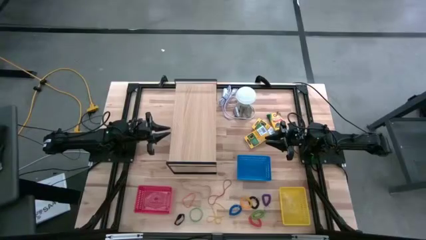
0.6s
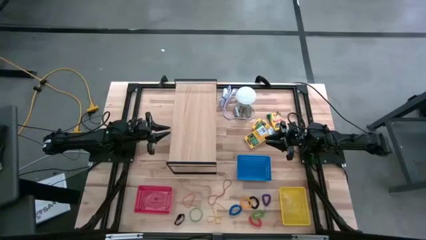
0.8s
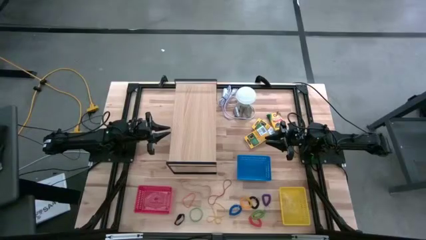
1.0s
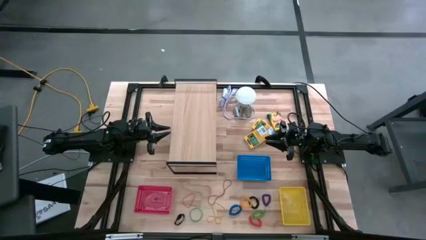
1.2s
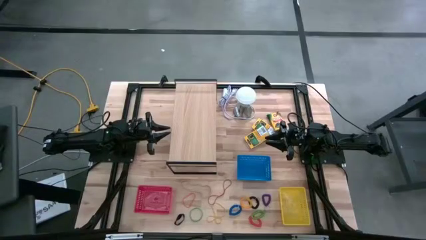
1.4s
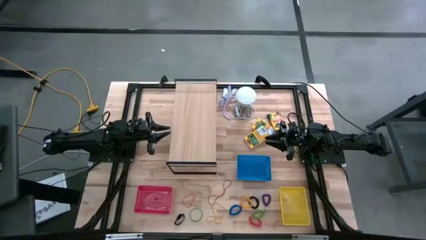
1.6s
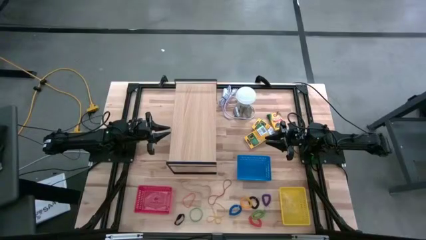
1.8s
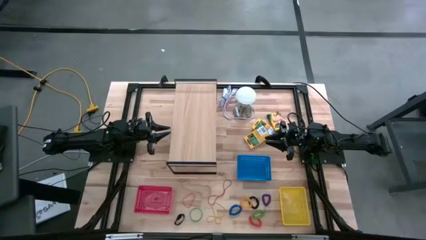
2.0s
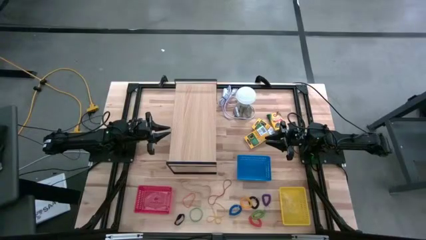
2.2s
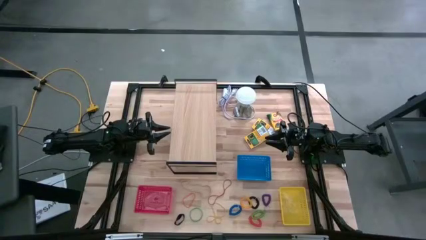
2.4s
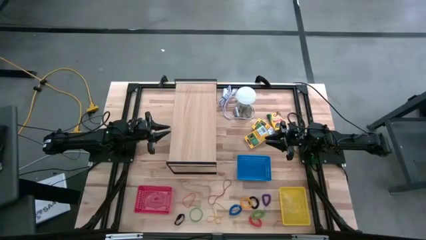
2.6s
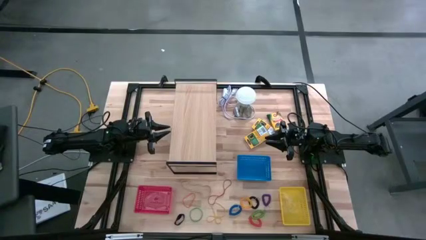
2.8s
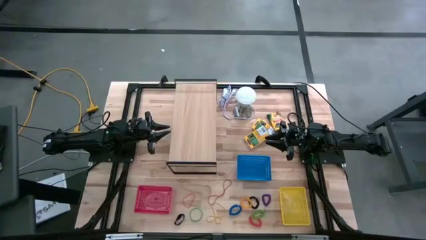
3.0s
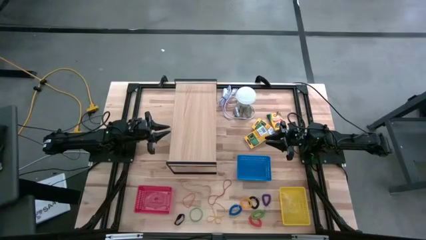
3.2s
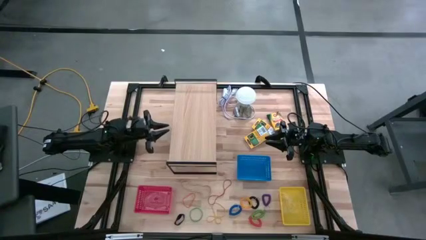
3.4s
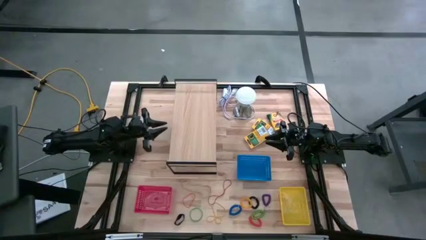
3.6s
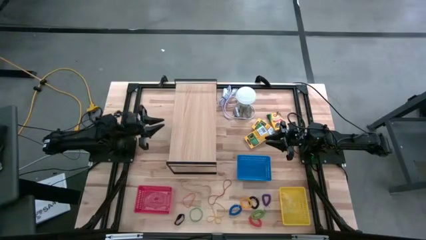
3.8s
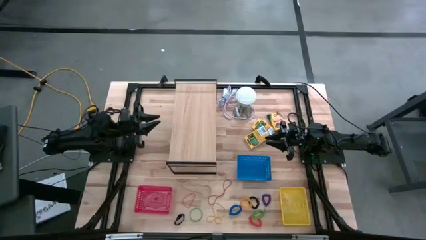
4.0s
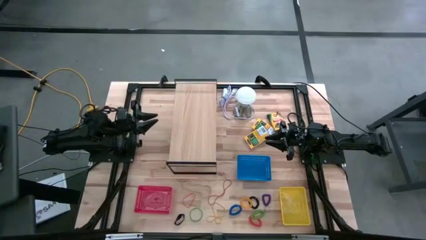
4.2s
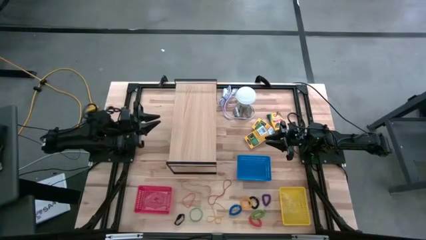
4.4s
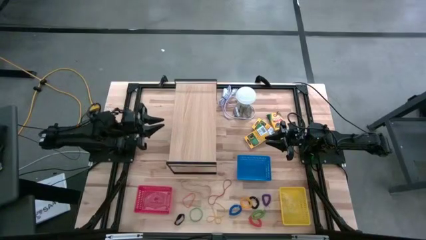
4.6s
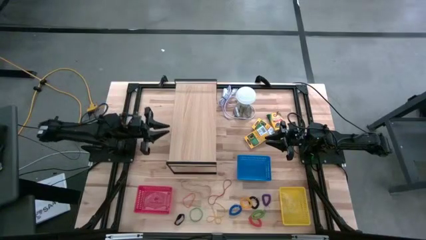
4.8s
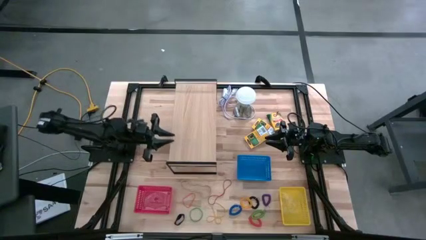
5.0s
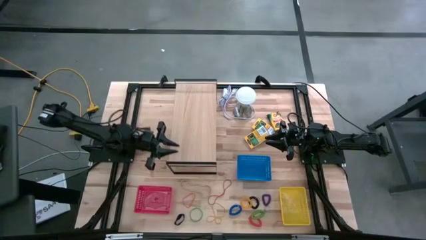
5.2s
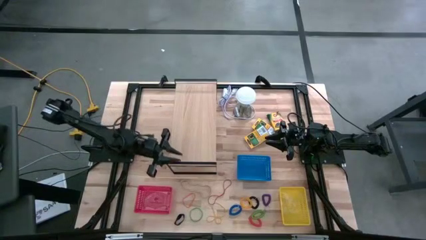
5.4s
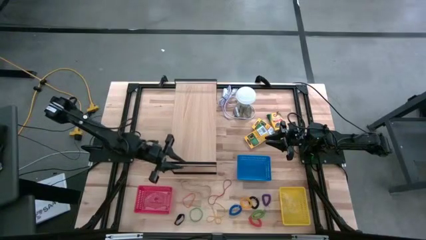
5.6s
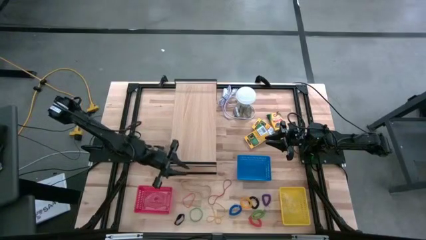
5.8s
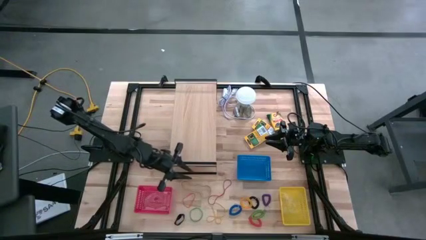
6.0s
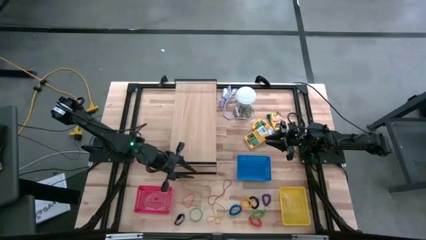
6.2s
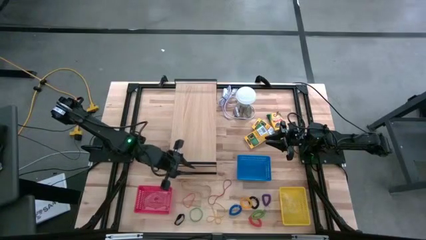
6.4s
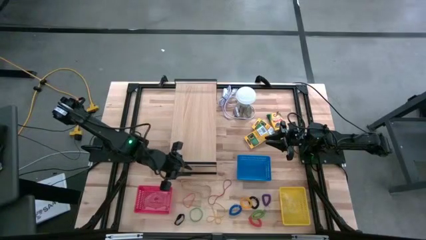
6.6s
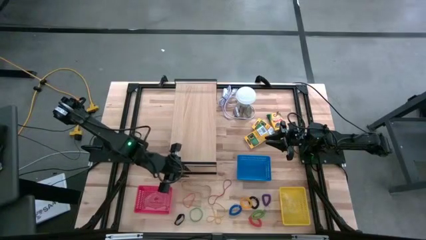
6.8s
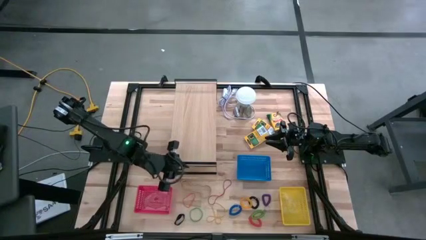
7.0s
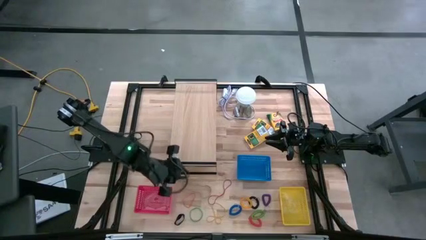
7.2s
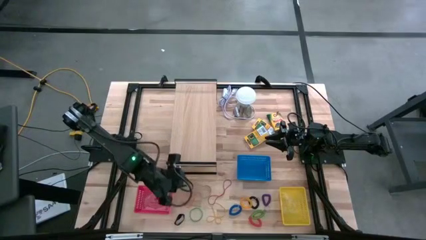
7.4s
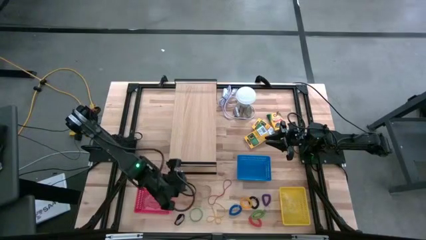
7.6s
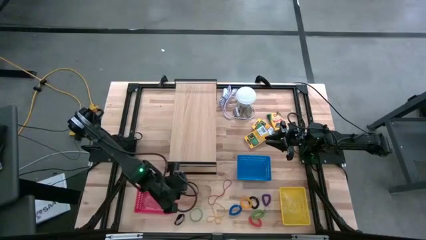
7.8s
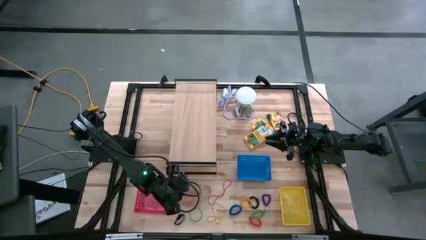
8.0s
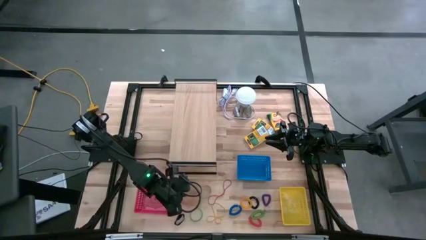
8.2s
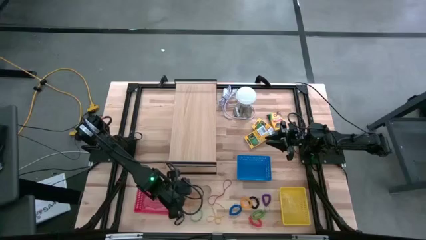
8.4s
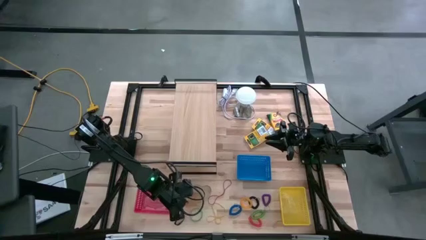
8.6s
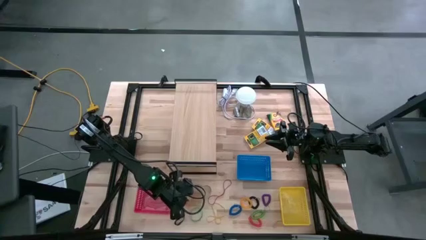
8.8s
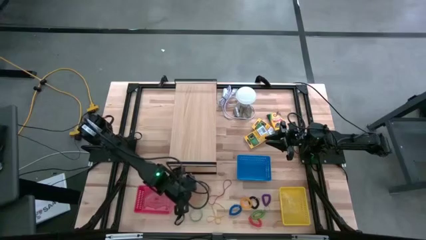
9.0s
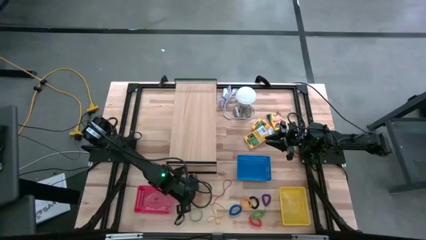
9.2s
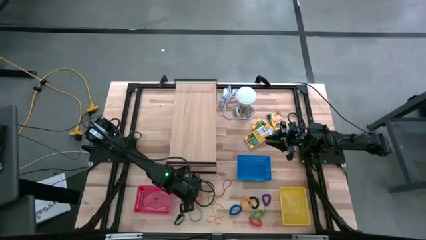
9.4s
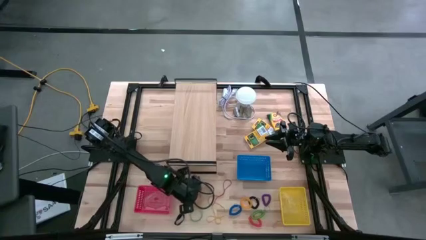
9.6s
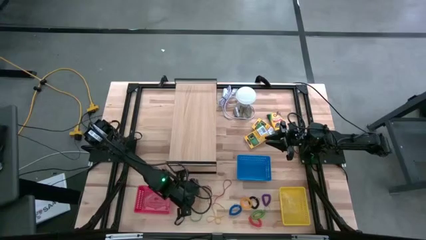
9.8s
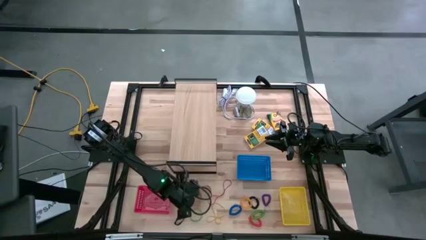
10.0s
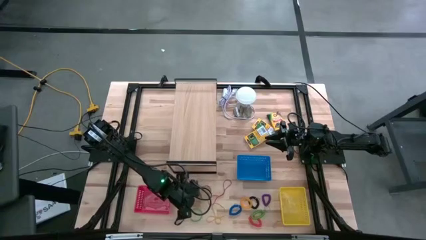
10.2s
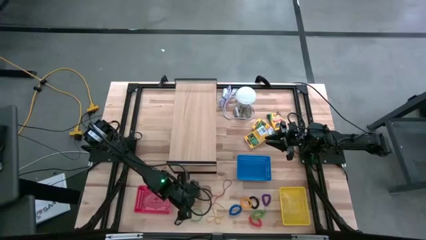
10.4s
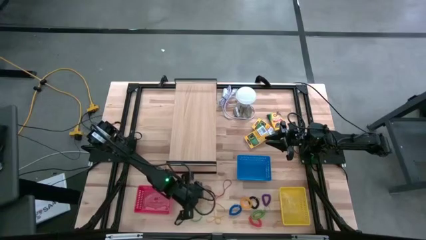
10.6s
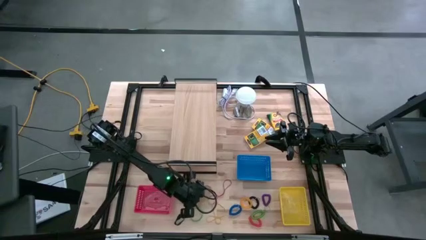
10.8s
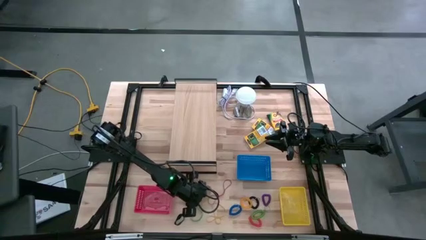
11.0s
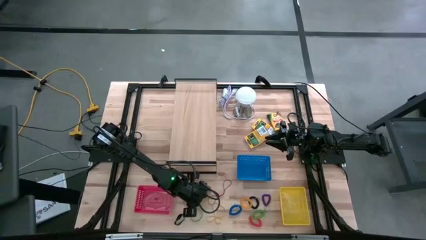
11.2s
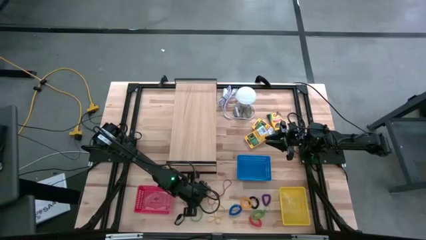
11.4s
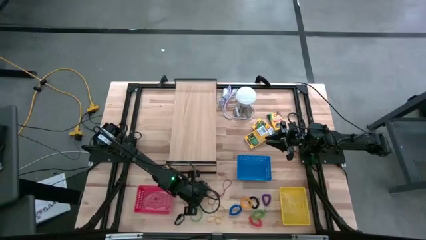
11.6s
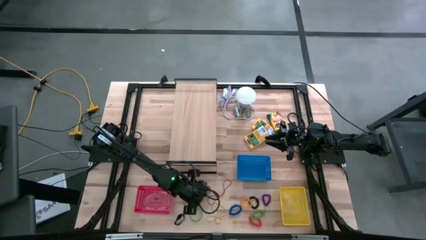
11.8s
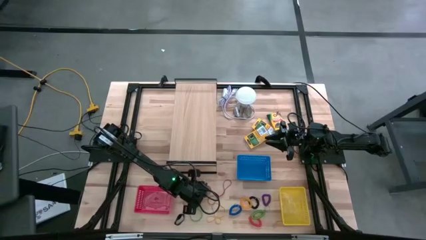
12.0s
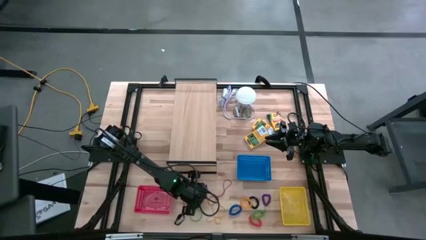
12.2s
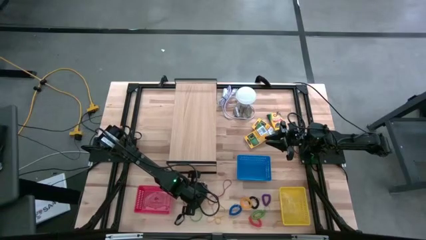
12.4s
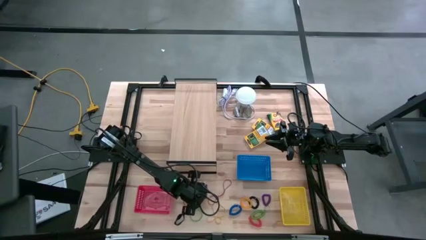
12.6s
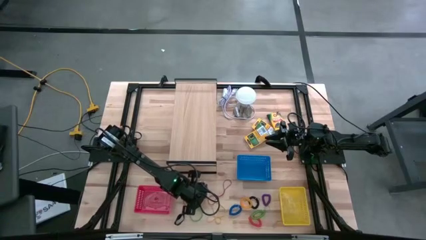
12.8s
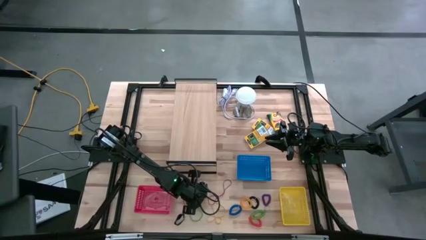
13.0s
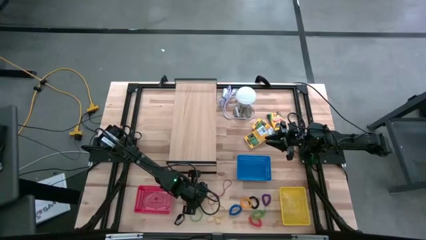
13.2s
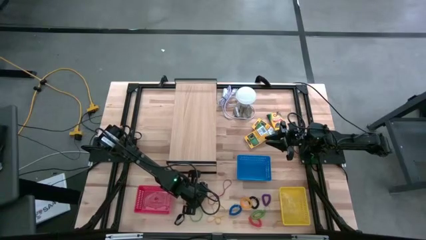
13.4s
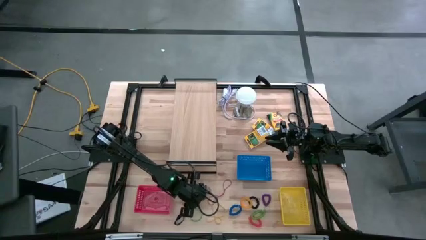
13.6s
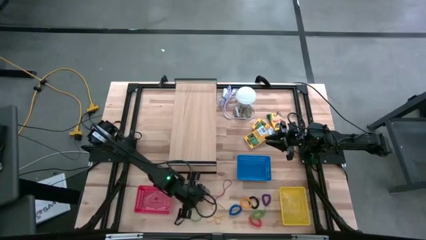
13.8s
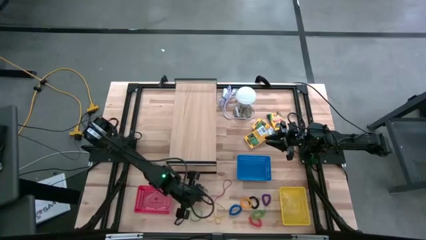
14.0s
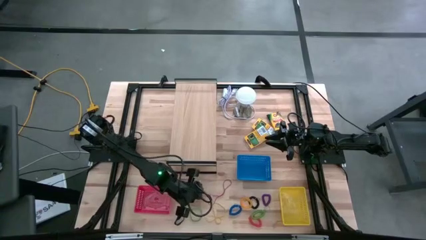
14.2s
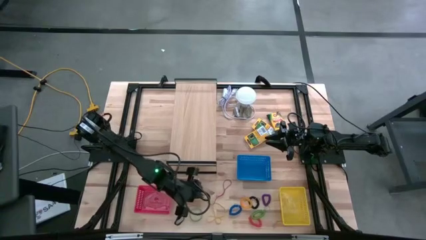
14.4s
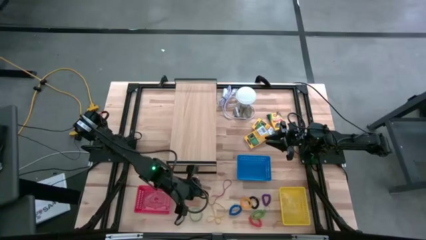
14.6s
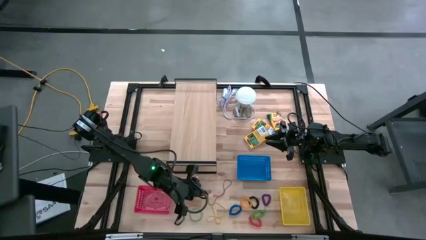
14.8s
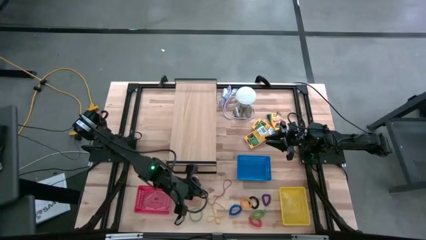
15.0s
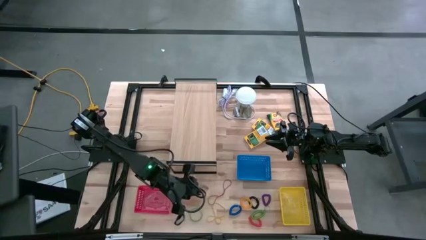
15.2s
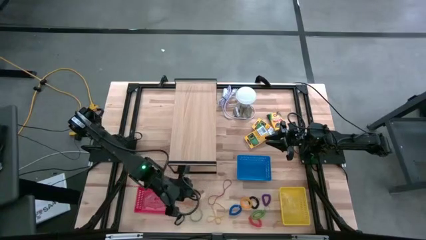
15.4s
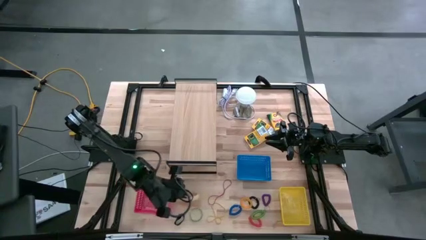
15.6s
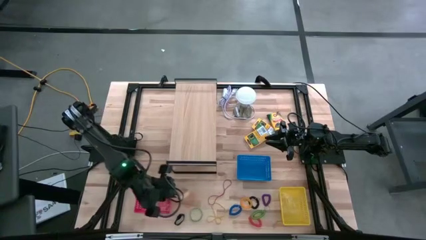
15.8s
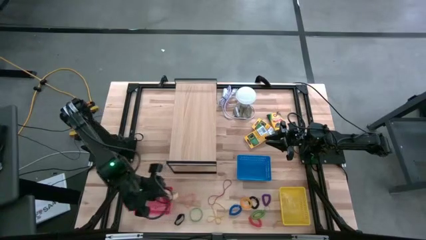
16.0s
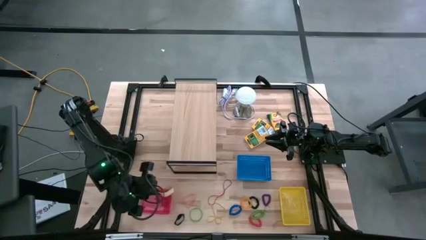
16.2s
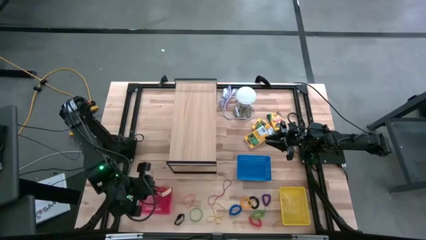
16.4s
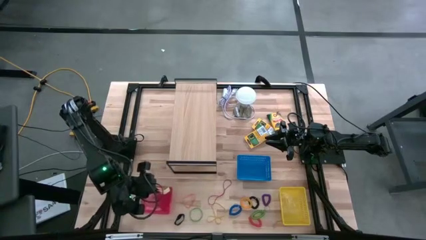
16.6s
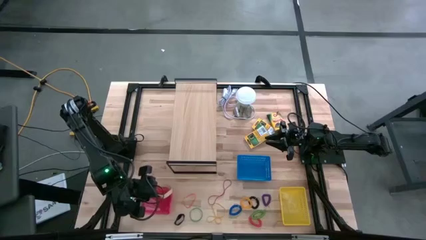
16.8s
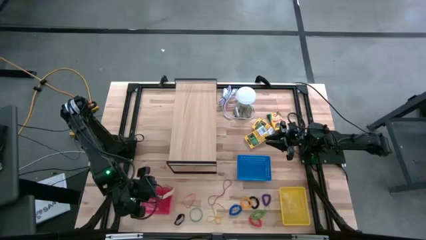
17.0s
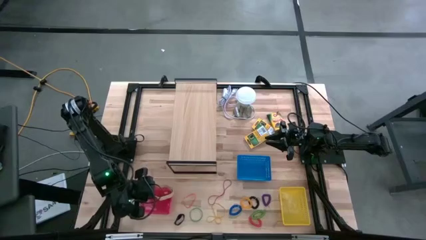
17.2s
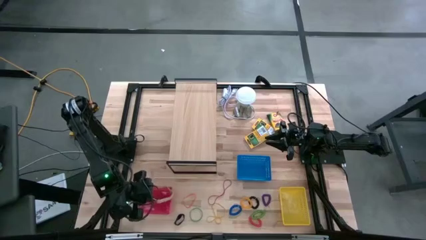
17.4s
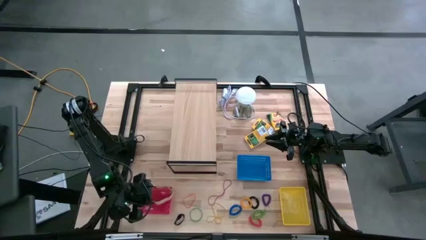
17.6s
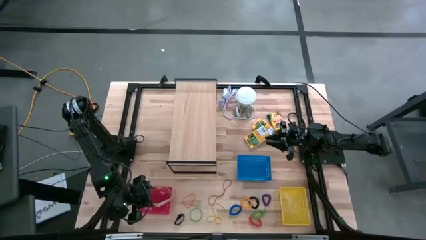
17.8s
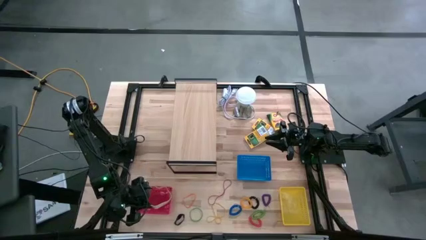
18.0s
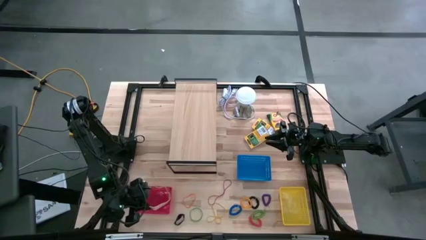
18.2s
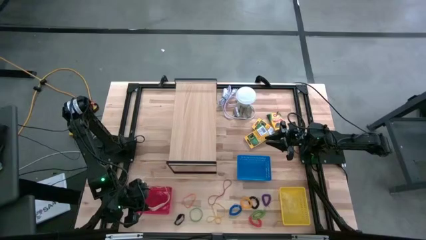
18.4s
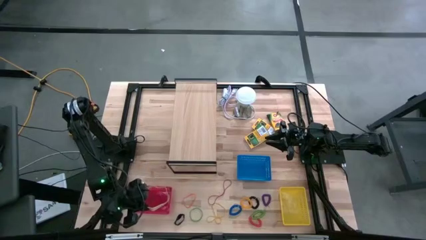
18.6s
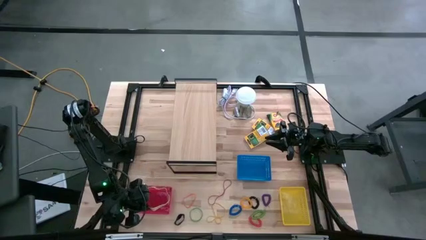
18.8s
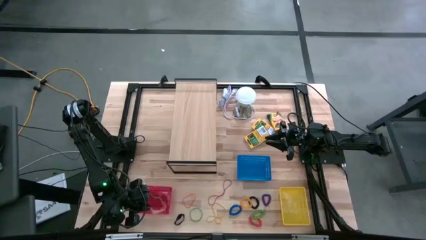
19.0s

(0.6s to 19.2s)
Task: Pick & Place Office Desk Supplies
Put the light brown rubber band into the red bin
